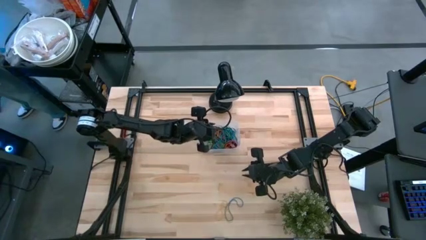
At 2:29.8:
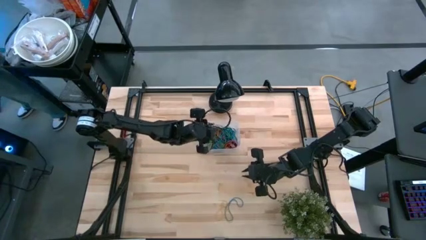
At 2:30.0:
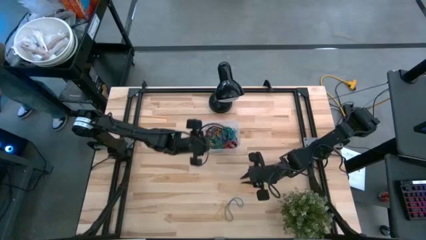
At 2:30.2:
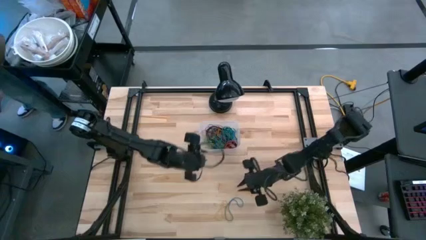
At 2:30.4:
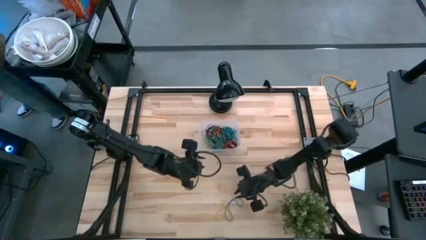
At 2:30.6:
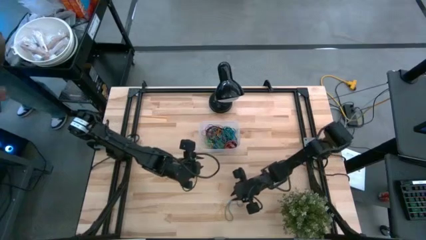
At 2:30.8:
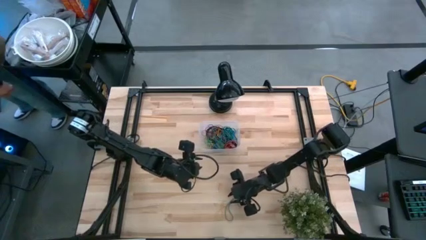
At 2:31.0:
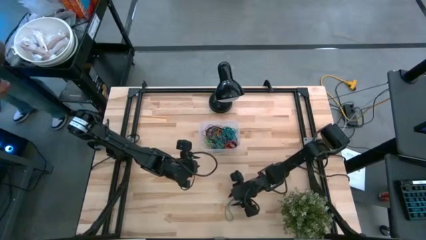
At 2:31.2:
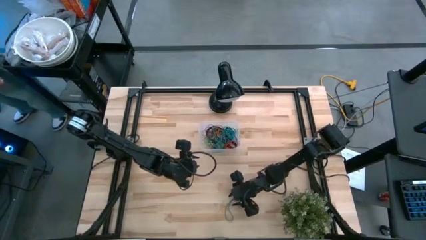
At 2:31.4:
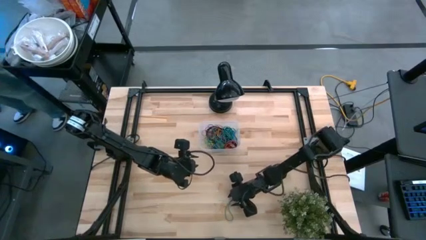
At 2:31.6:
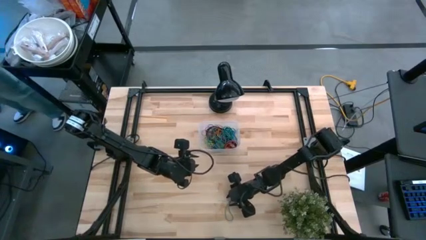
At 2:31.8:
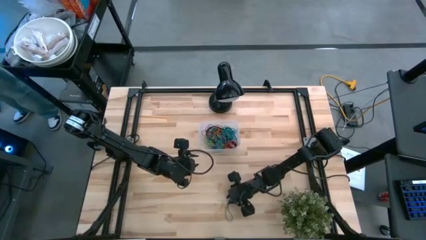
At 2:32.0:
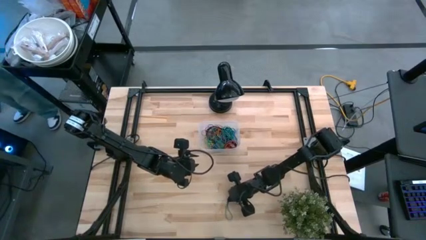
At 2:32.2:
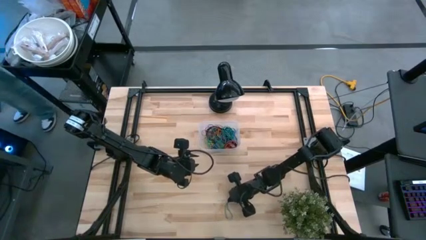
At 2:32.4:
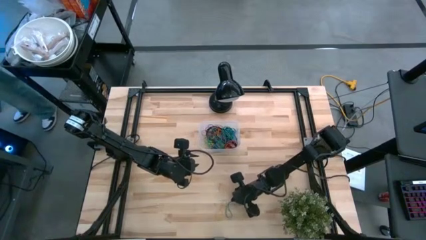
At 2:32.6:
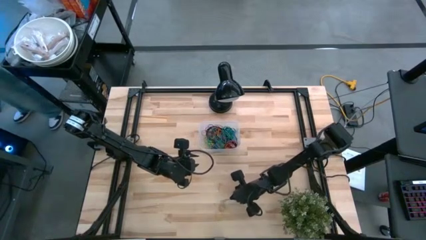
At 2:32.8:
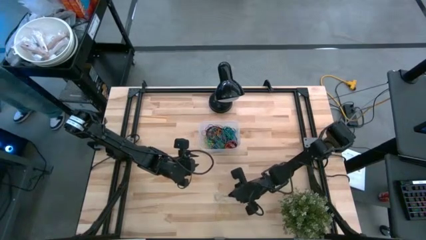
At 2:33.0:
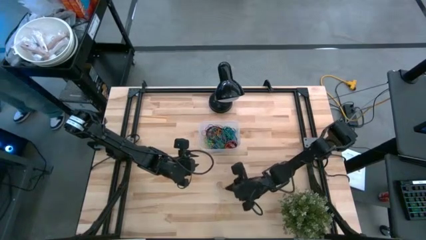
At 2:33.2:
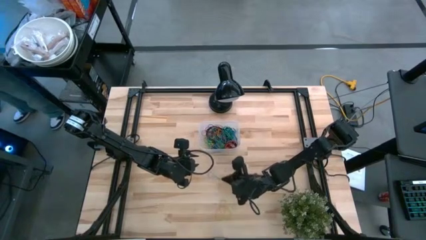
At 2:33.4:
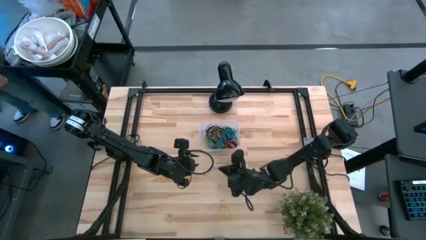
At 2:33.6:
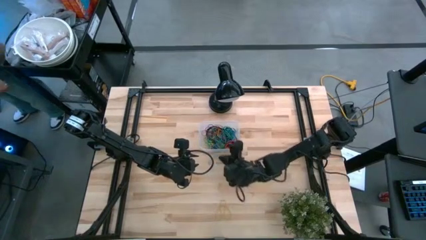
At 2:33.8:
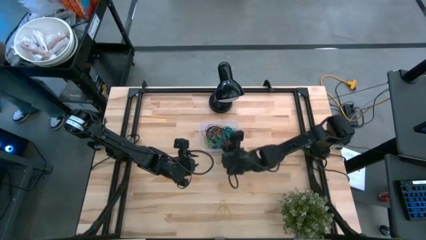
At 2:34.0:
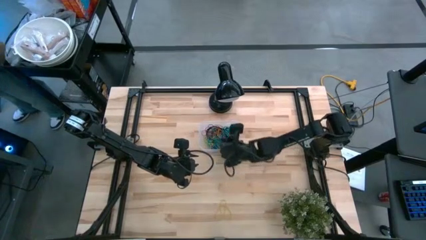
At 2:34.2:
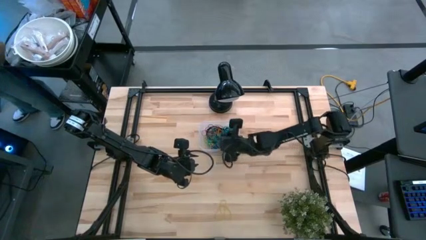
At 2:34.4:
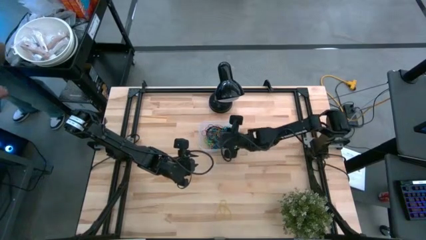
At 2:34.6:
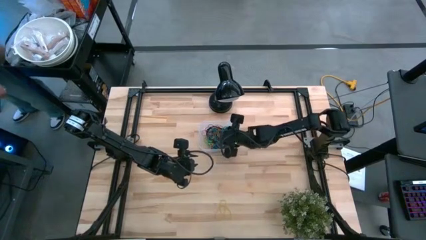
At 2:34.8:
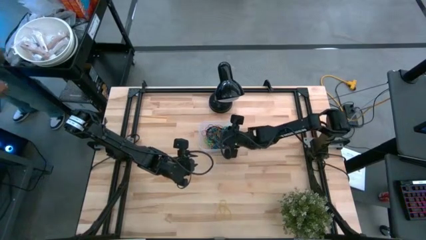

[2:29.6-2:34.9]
Task: Pick and place rubber bands into bin
Put the blue rubber band into the transparent bin

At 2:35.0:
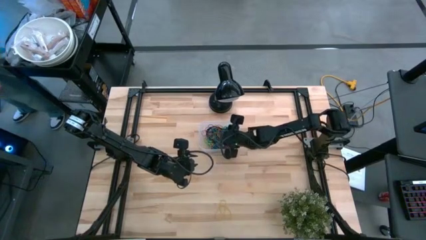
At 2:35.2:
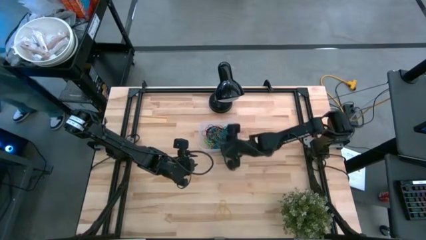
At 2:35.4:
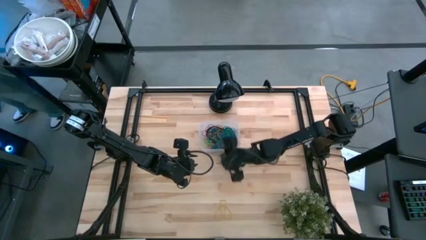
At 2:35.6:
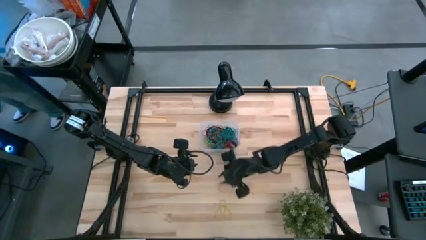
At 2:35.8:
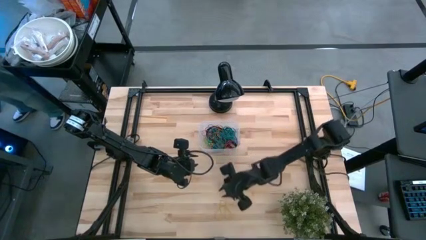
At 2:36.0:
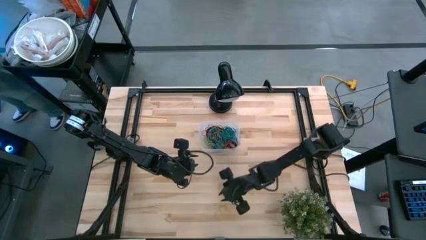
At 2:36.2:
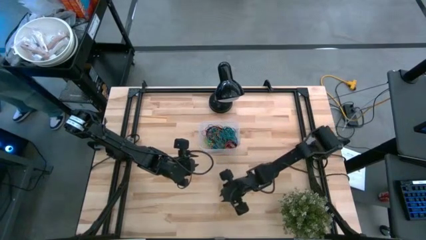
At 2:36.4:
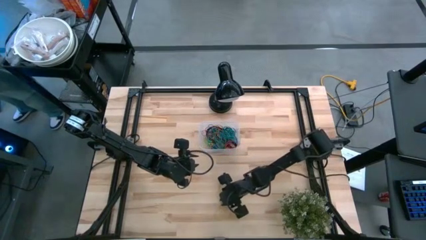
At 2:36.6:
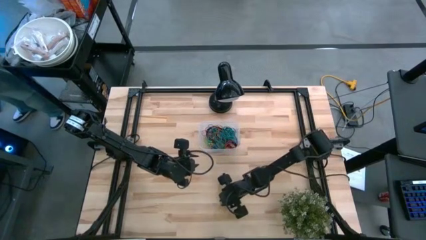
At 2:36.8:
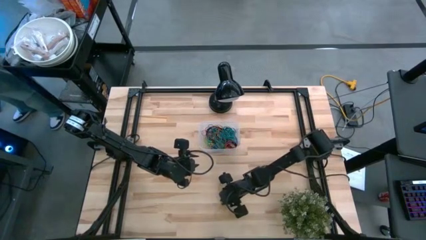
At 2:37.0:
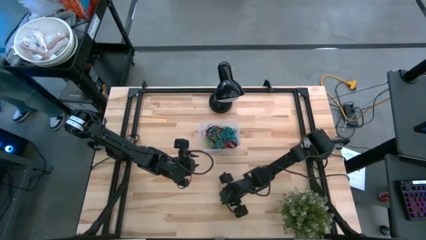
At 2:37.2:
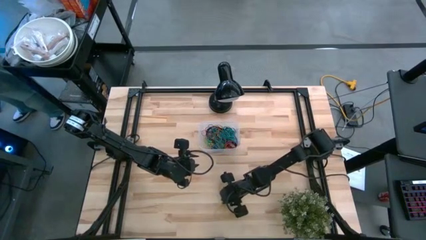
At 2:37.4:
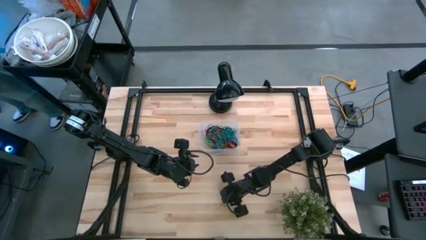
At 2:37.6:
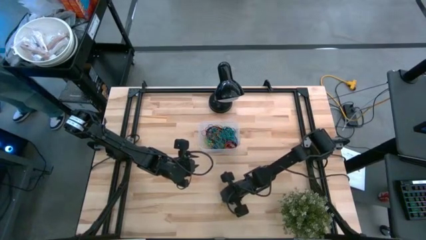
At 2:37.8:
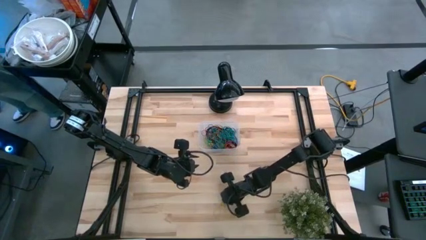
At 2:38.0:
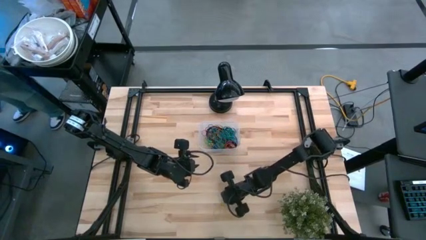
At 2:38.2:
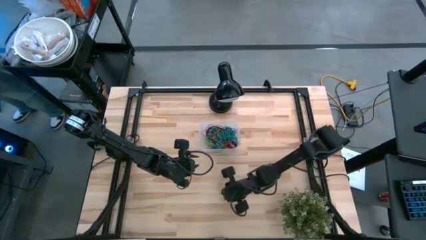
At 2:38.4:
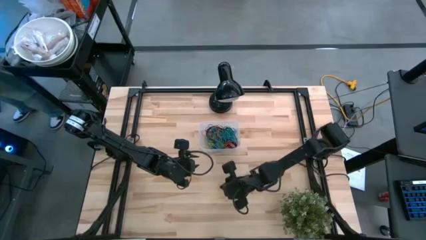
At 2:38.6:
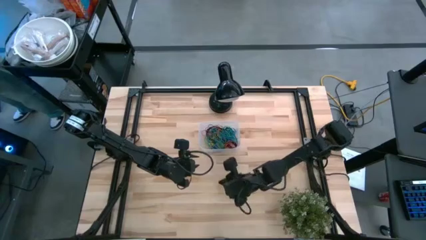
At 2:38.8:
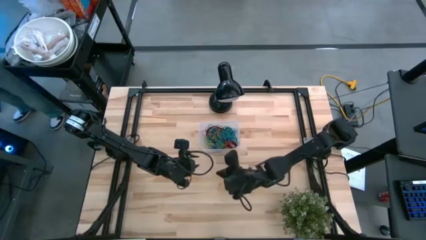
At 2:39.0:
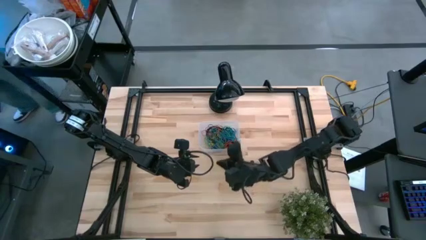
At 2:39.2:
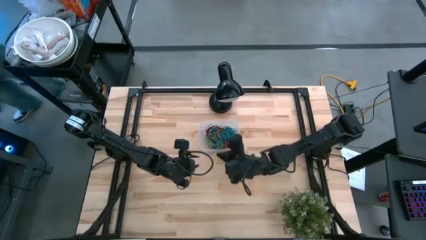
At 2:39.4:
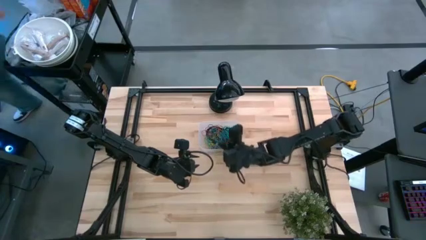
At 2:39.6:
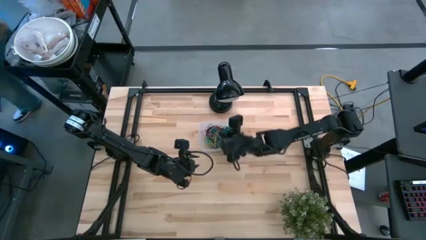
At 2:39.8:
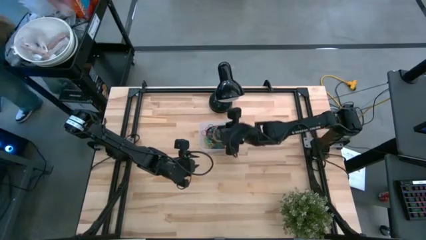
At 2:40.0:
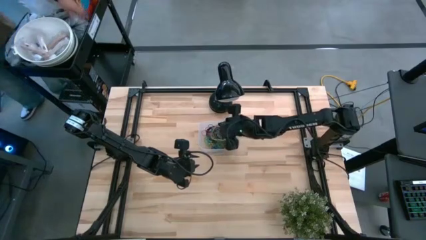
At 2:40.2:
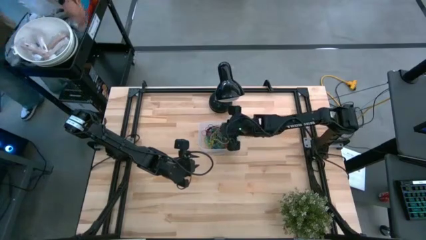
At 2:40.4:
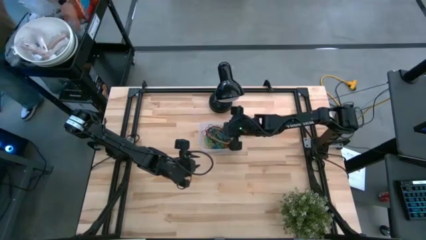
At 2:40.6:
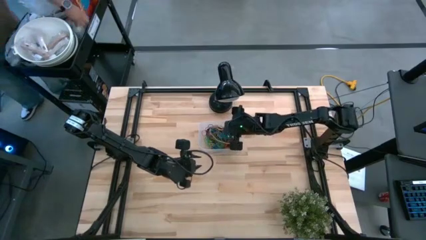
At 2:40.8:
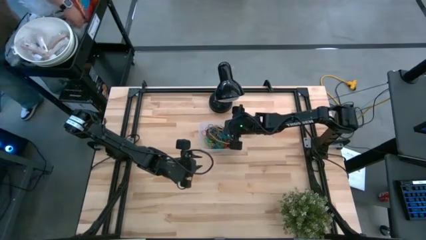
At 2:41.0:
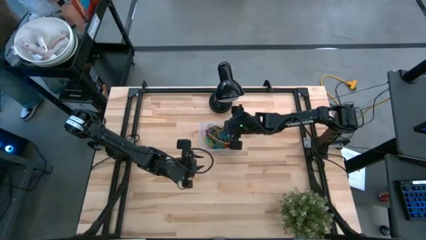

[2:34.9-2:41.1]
Put the yellow rubber band into the transparent bin

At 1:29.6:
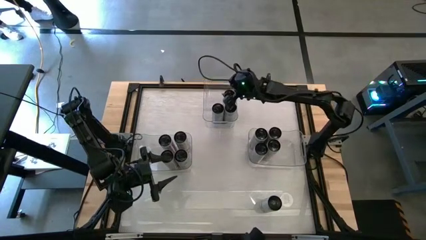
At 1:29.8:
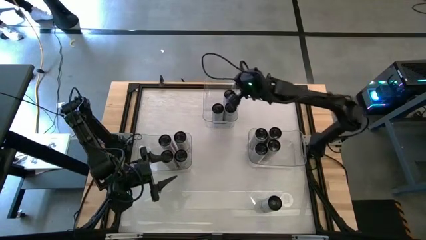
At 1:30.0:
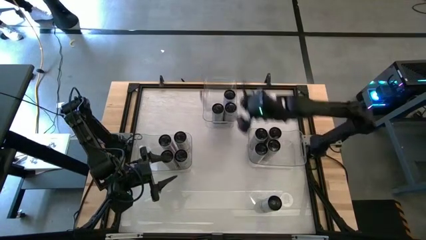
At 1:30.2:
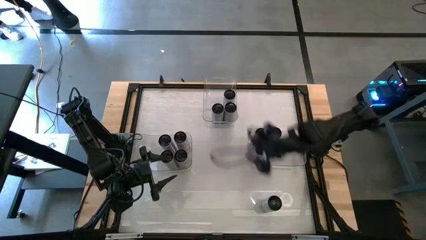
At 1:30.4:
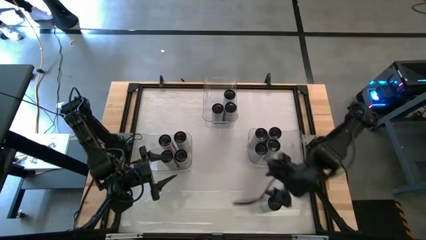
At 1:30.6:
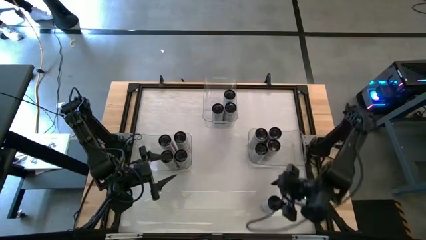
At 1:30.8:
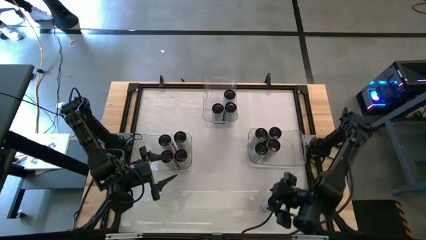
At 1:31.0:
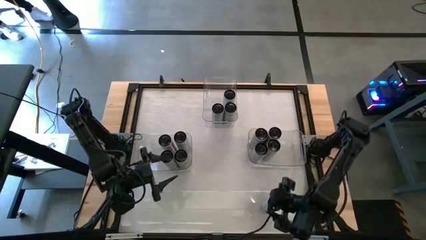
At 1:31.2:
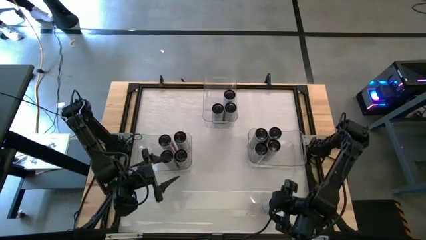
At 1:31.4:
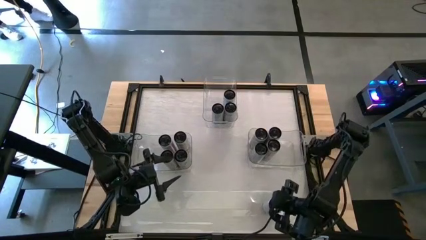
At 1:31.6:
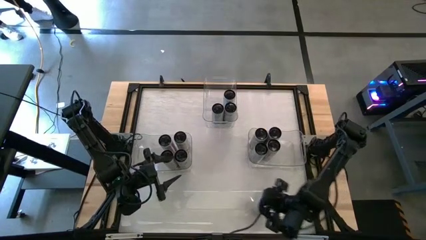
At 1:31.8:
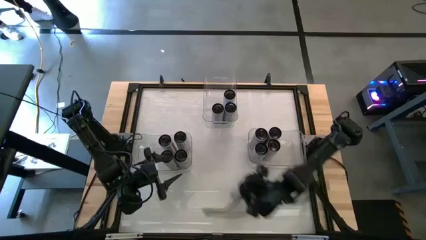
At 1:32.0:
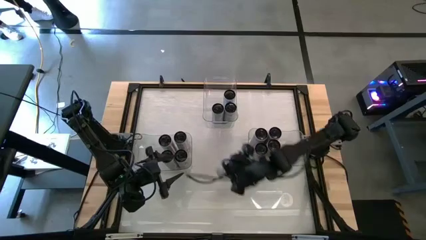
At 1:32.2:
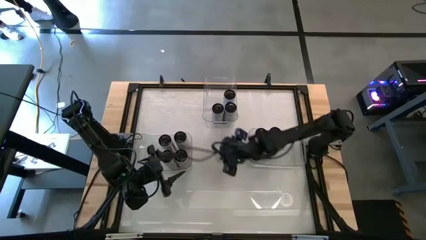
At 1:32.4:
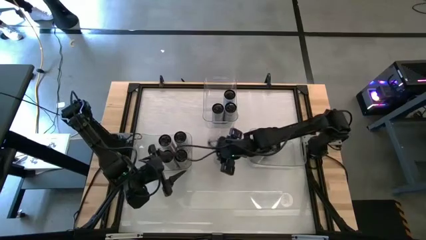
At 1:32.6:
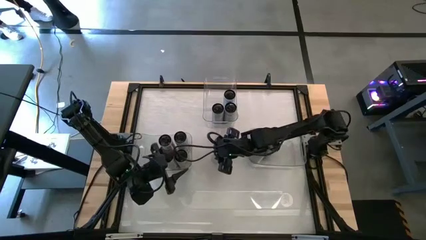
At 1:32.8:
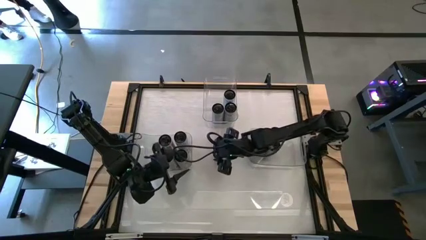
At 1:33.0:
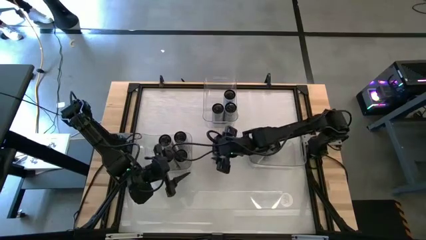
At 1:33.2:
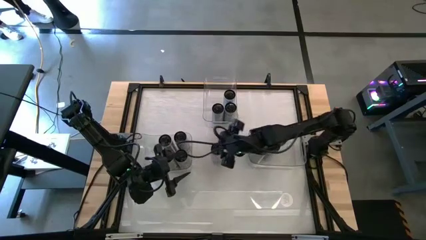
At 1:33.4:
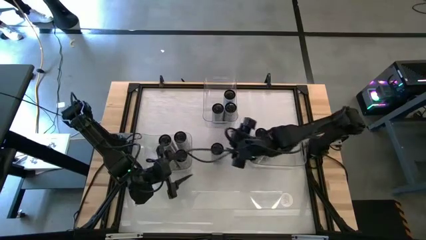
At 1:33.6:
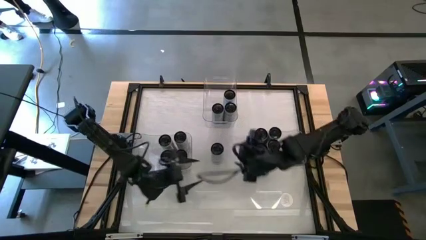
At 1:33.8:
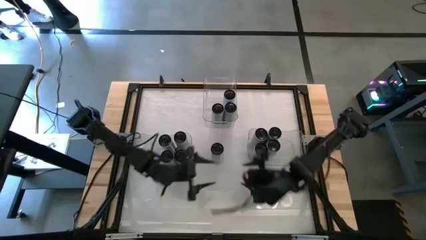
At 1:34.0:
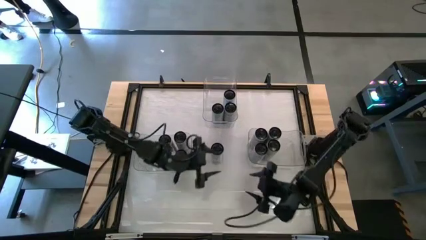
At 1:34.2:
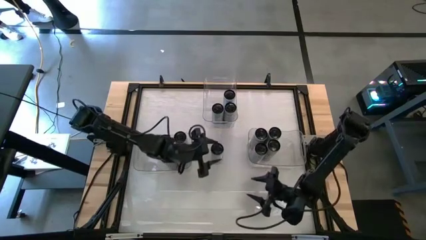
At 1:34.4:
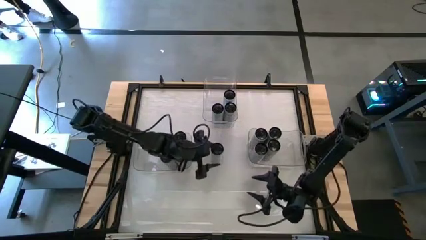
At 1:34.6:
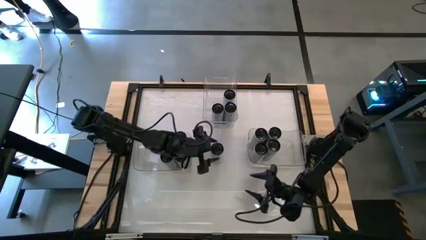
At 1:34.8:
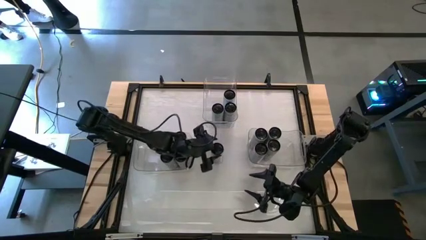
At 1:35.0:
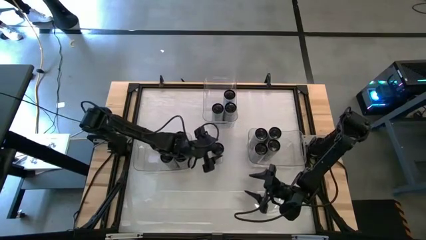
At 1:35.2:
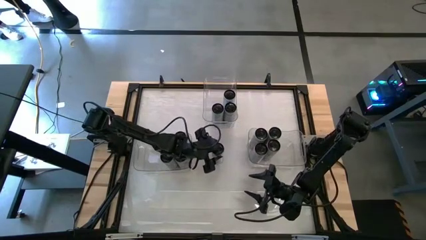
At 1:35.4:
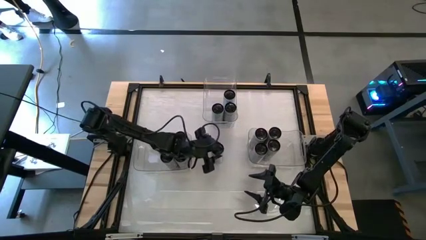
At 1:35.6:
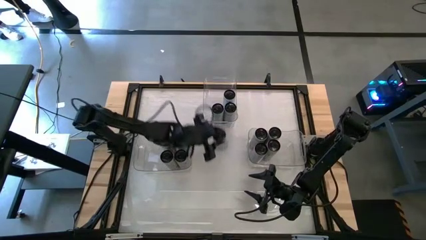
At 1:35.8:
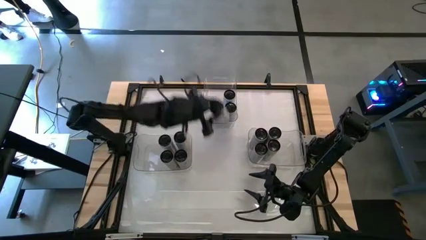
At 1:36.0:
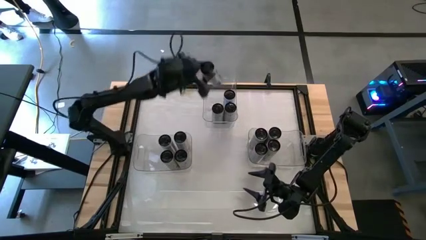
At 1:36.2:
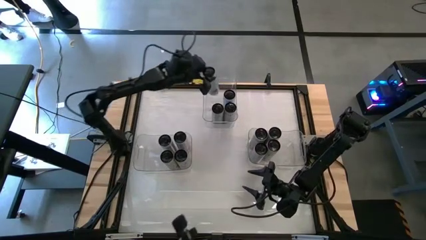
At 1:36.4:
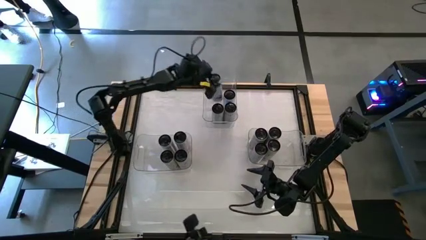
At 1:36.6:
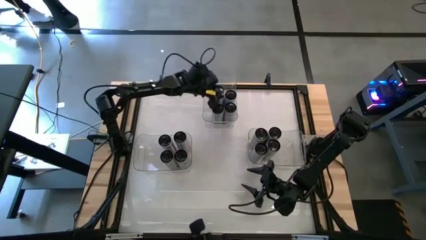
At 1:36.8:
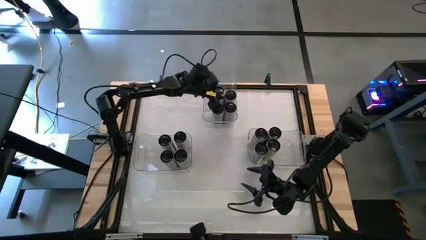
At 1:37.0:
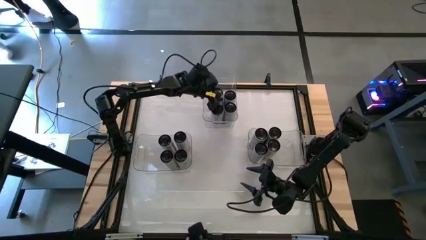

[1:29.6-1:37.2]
Task: Sort soda cans
Put the white-blue soda can into the top middle transparent bin
